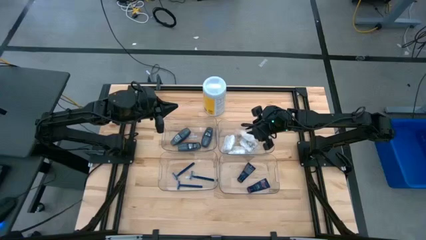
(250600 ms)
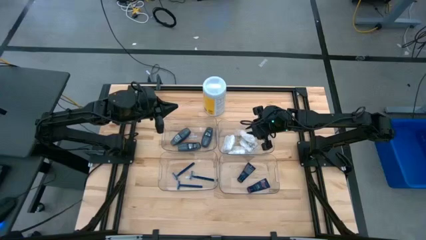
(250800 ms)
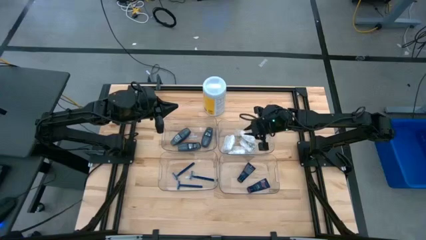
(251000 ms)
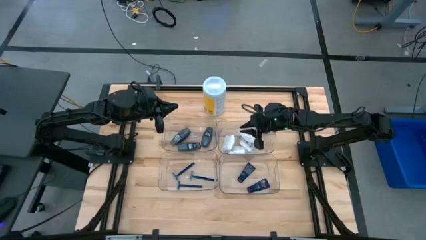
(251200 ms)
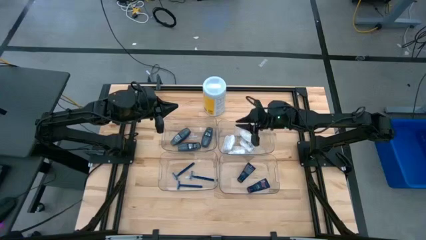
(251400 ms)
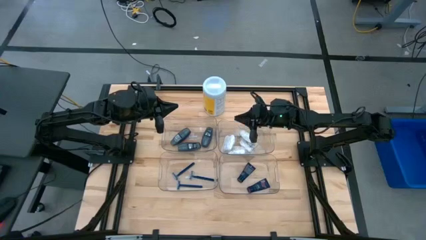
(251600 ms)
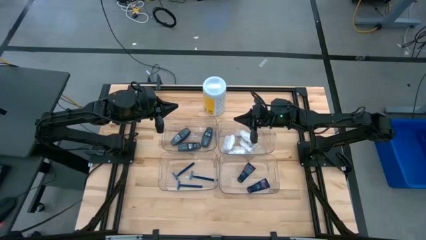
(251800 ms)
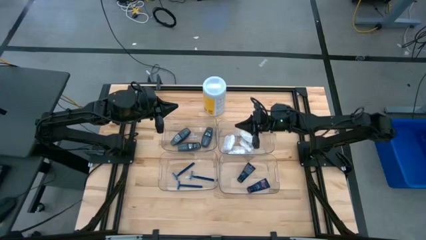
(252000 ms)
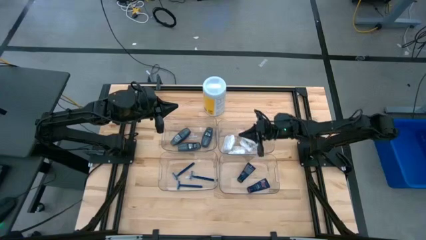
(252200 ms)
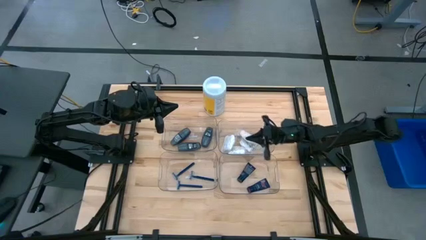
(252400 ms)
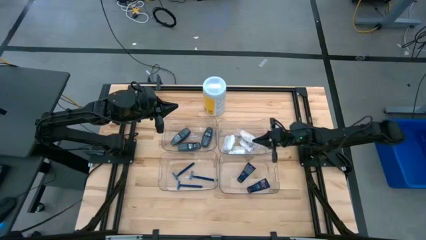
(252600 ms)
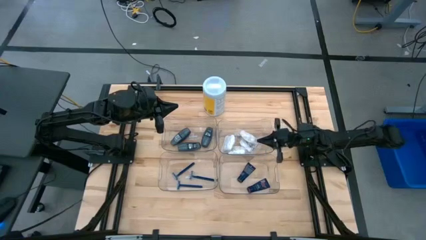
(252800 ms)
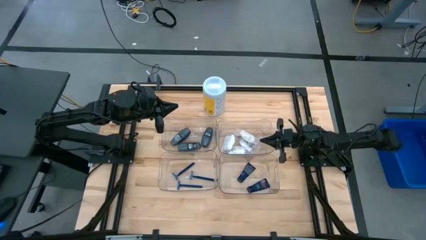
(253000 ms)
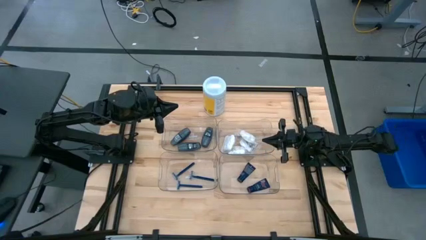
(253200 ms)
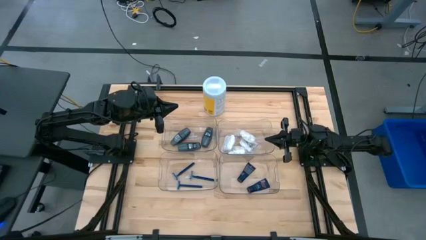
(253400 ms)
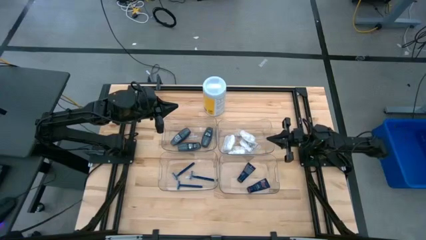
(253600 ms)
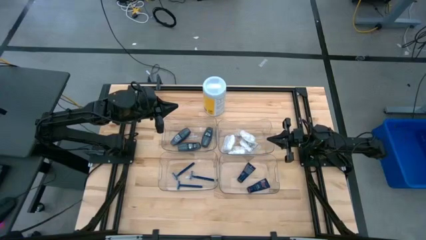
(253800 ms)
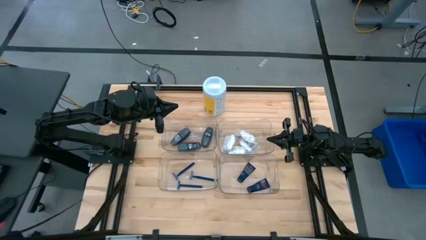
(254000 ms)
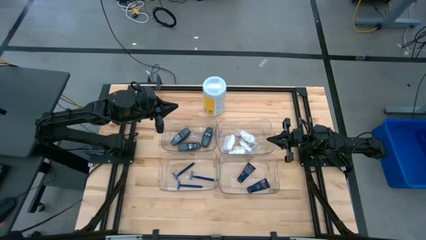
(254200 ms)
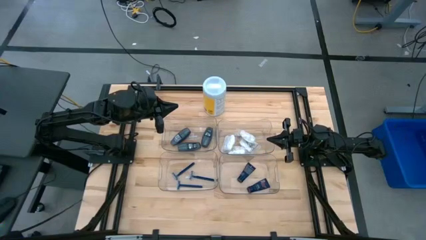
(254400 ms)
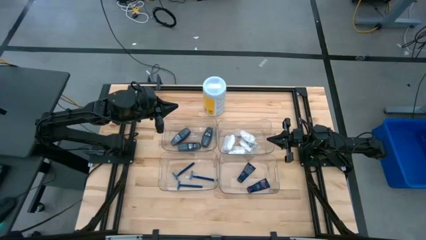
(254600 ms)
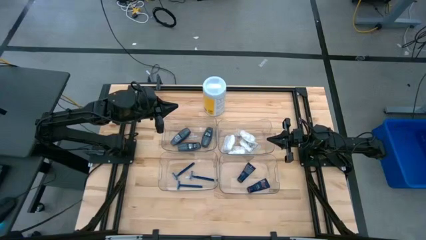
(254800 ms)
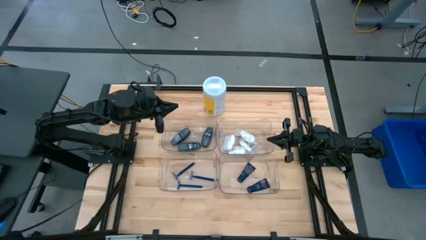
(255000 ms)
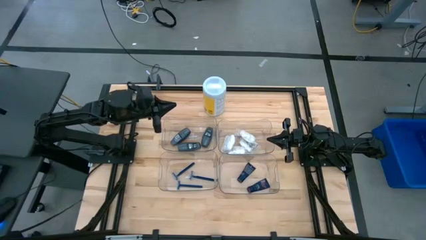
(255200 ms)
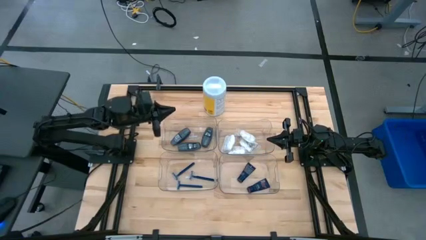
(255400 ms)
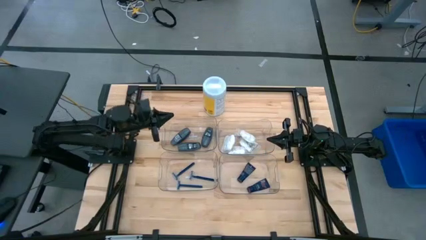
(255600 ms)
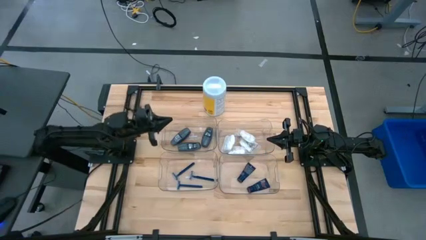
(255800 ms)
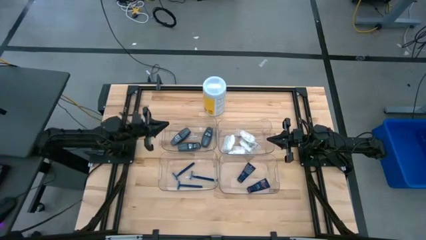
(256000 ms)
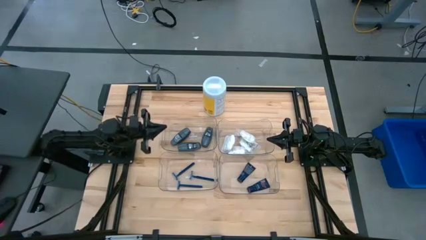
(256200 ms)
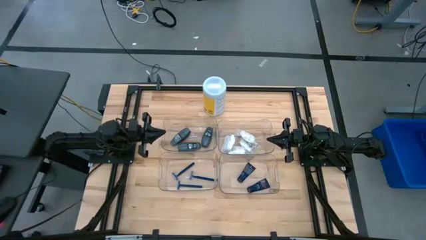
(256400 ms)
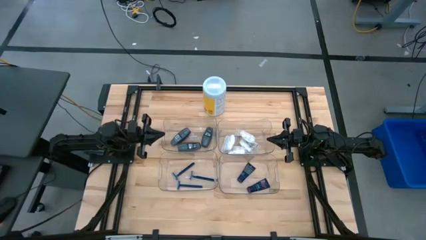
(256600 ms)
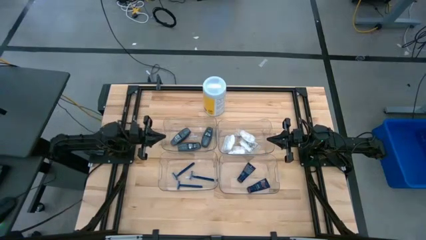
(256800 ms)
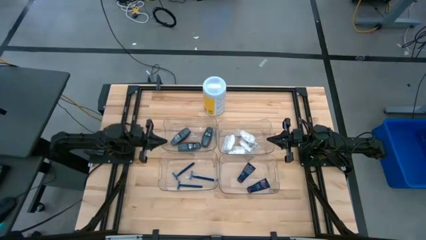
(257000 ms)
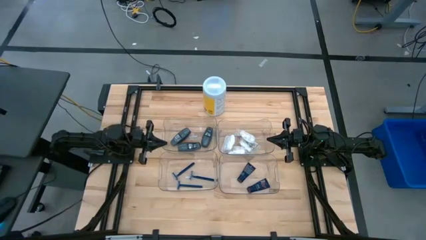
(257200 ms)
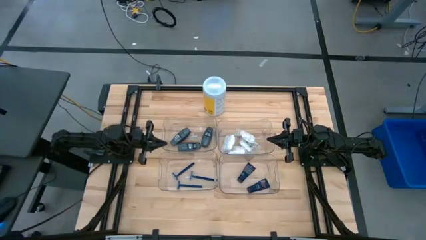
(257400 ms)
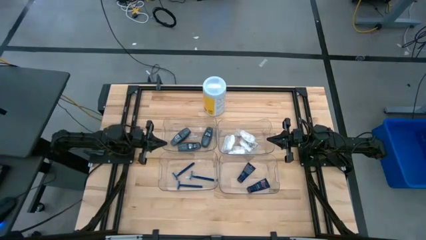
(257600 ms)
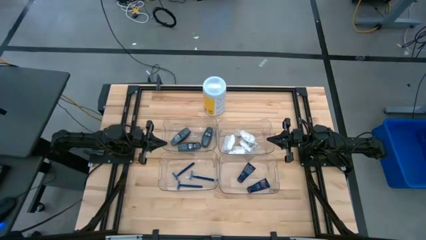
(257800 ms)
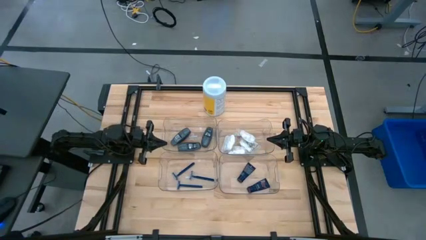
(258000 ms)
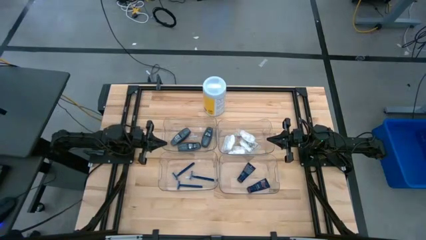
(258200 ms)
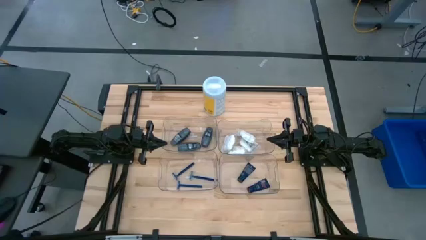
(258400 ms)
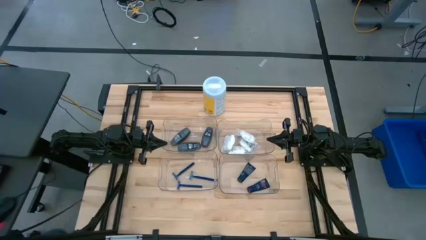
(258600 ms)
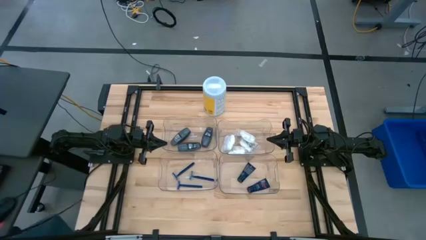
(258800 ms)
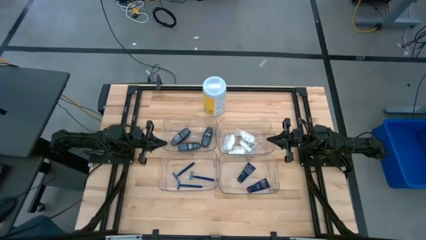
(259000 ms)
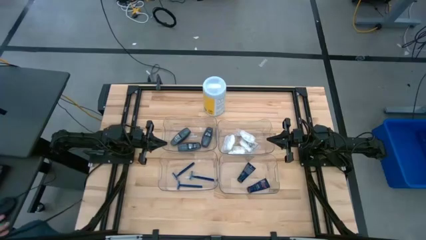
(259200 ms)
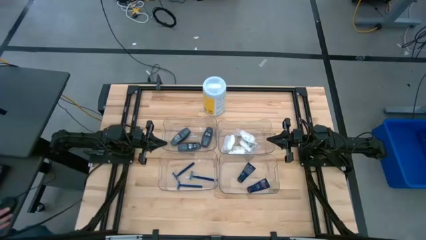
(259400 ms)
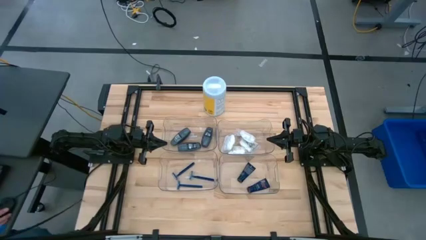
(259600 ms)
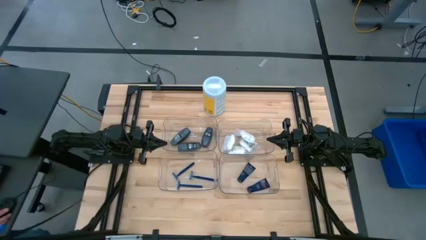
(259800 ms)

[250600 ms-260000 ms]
Task: Pick & Place Travel size toiletries
Return to Home Position

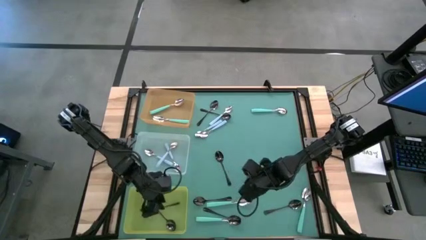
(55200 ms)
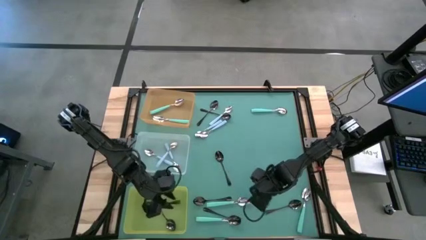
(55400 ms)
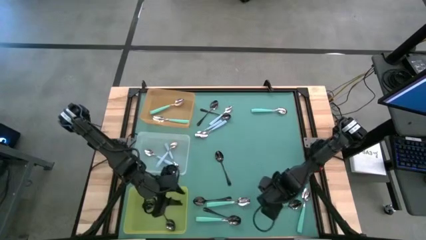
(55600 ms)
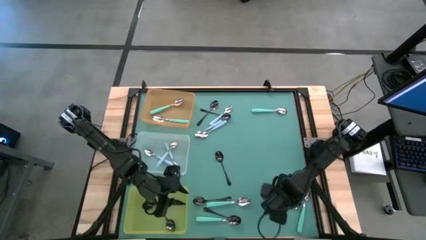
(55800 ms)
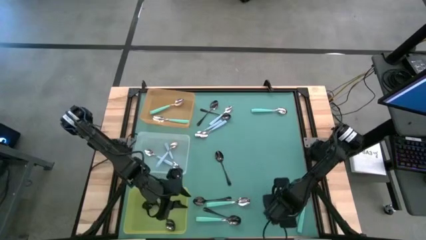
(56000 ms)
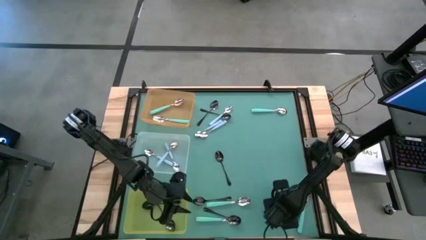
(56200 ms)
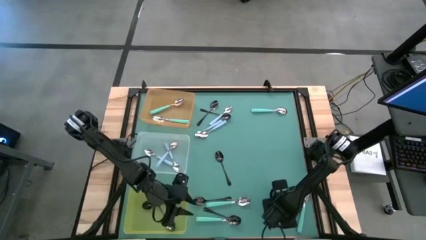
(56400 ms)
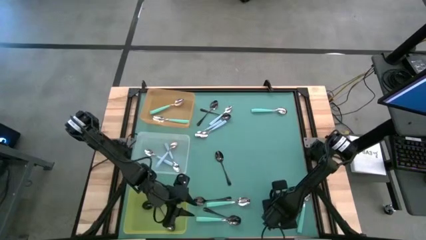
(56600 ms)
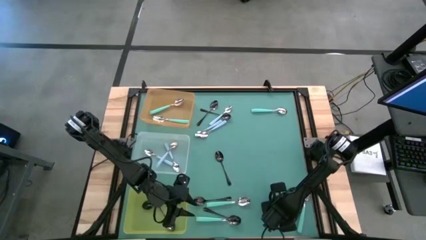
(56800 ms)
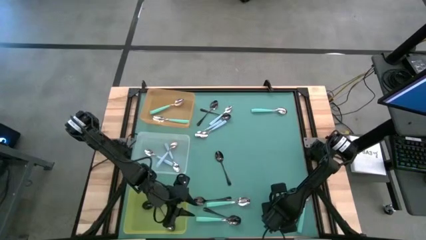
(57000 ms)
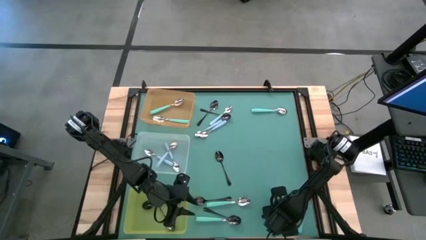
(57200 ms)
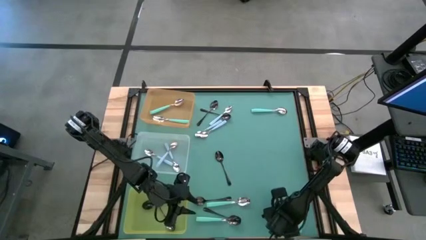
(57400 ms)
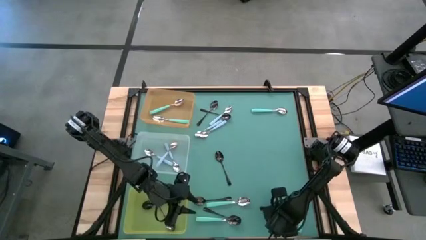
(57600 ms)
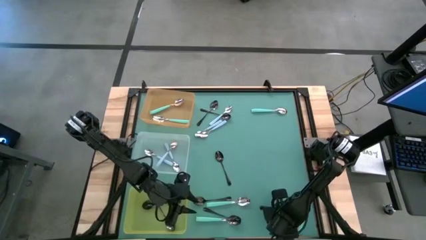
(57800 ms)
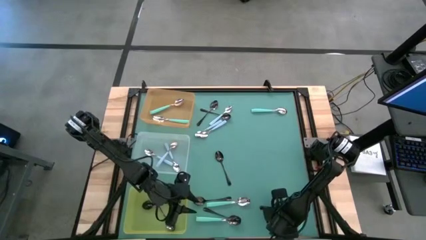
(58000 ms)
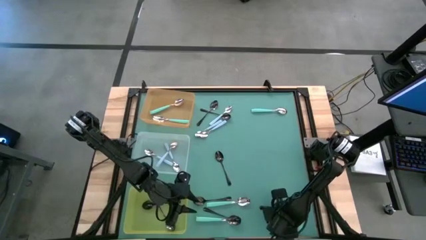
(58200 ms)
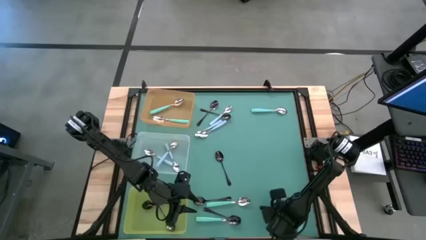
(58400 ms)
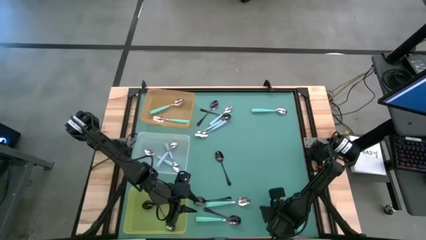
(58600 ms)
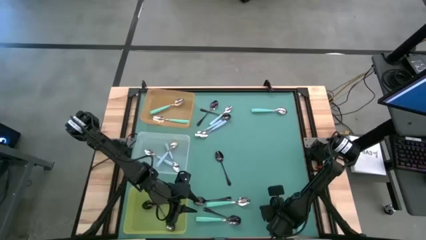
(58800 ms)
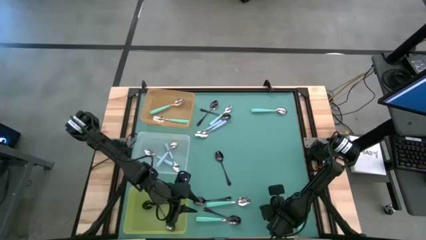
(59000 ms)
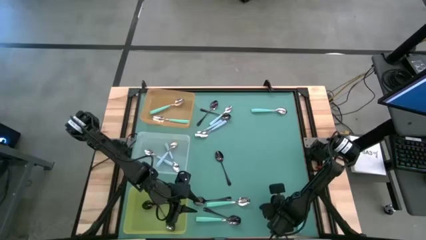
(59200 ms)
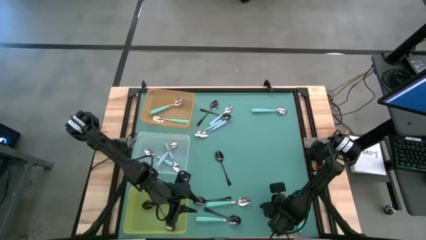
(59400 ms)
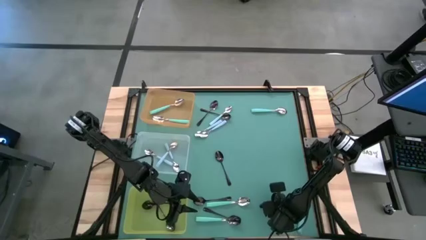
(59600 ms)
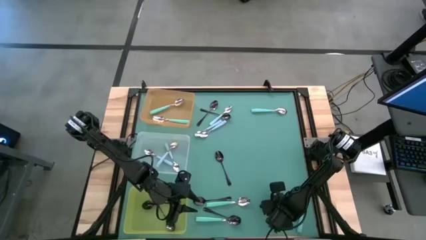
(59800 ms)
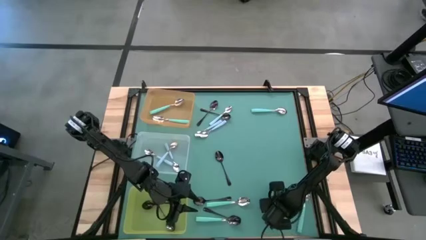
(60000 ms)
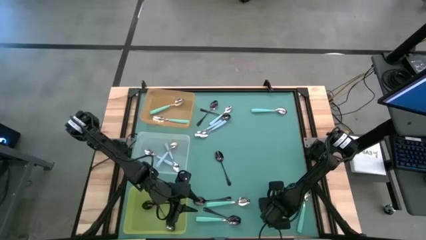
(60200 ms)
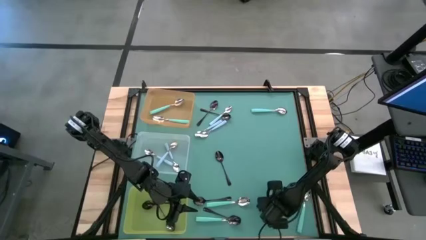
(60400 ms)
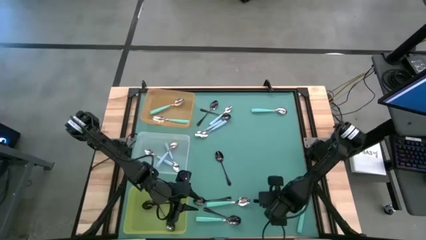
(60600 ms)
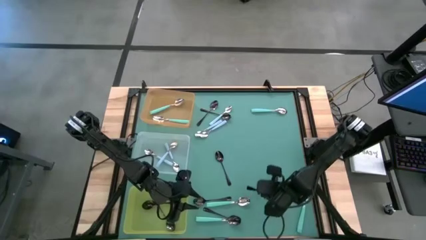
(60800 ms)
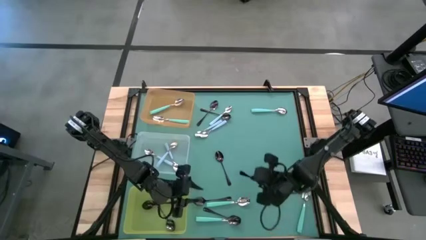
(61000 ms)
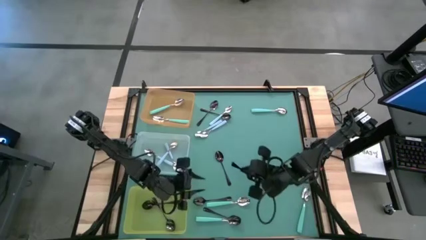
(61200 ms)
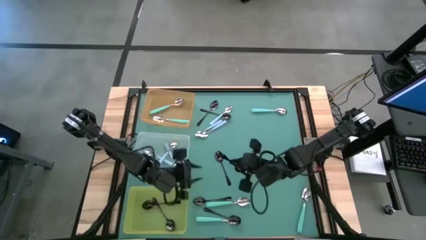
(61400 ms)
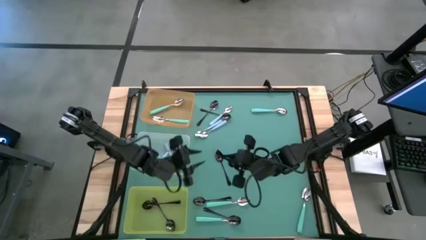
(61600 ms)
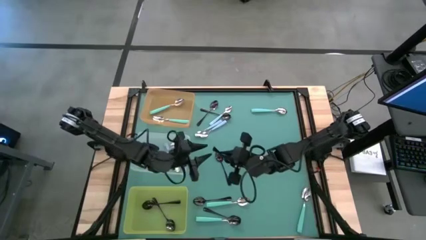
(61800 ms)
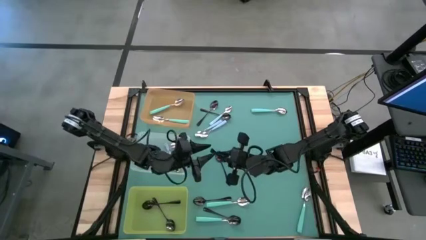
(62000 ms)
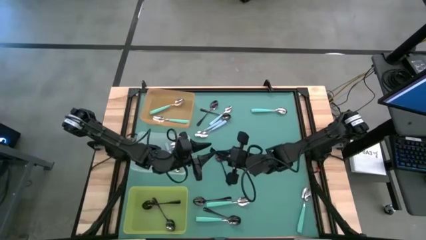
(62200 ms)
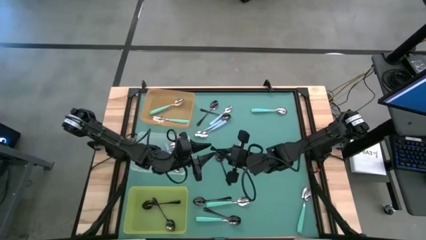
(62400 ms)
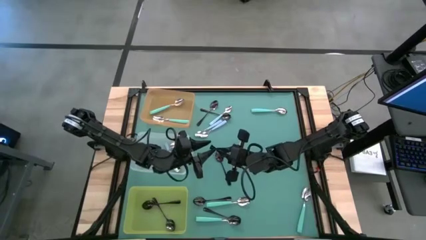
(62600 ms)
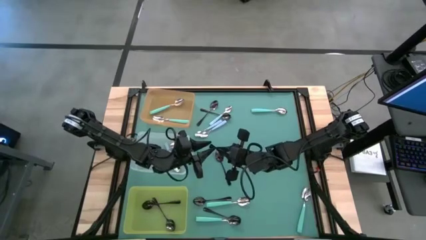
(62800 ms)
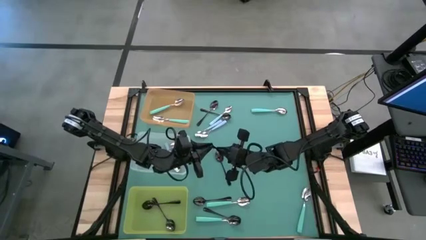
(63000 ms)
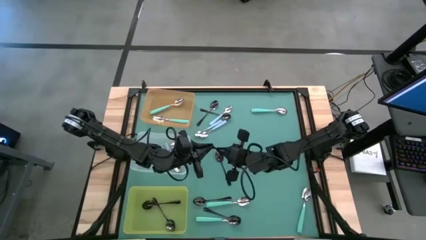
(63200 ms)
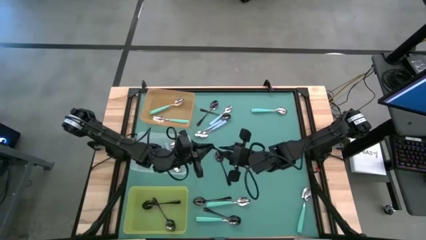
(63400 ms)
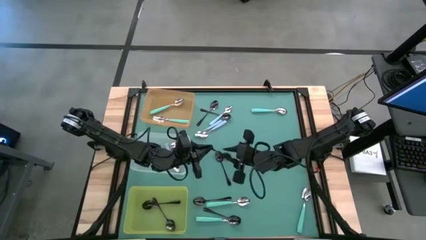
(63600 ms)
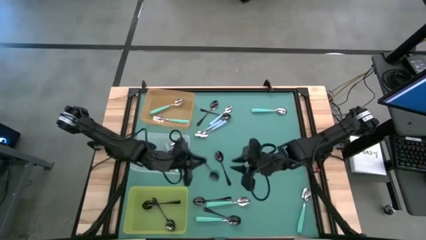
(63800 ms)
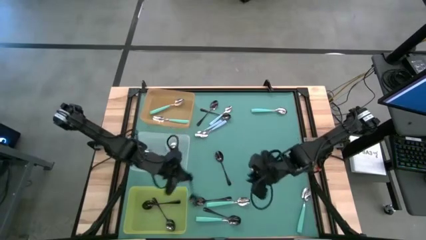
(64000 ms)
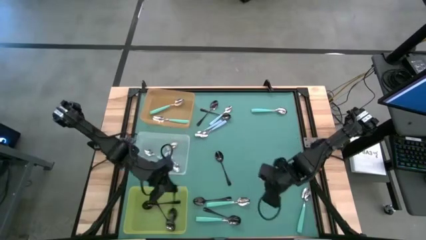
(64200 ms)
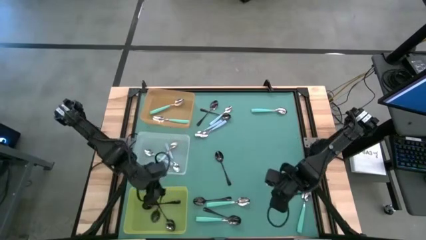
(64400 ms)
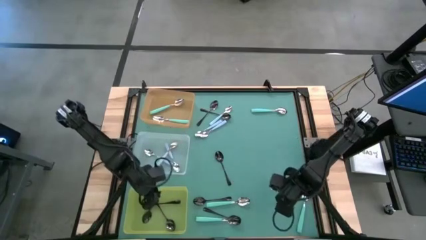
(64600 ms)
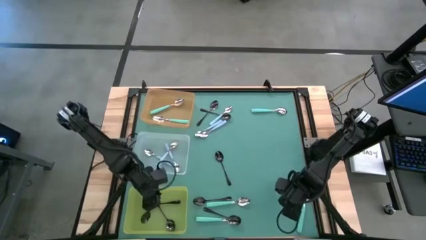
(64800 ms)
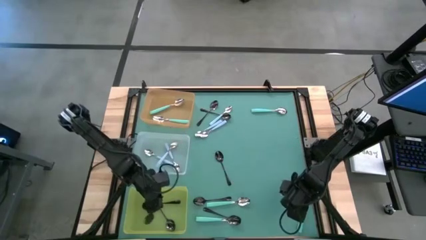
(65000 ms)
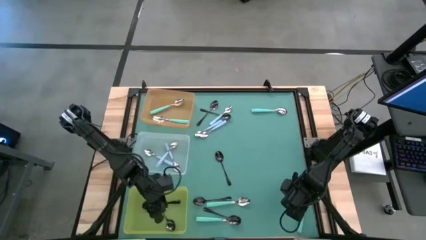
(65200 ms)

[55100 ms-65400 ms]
Task: Sort silverware by color (type)
Put the black spoon into the yellow bin
